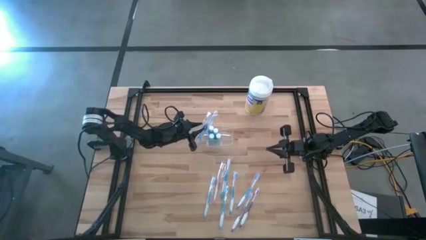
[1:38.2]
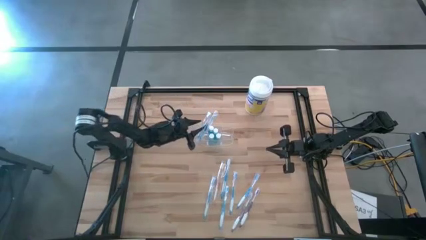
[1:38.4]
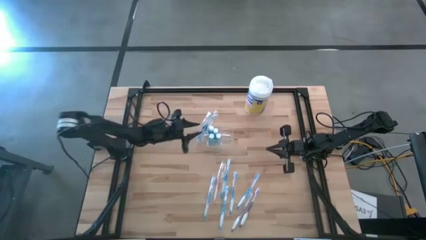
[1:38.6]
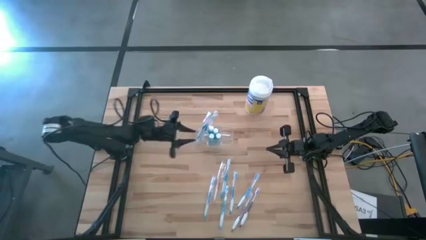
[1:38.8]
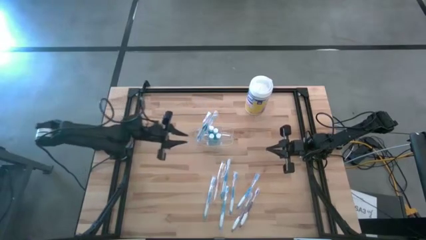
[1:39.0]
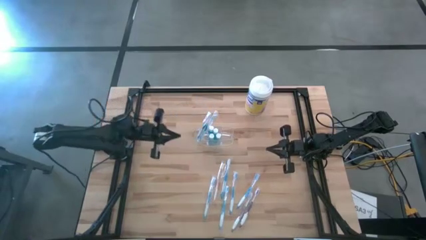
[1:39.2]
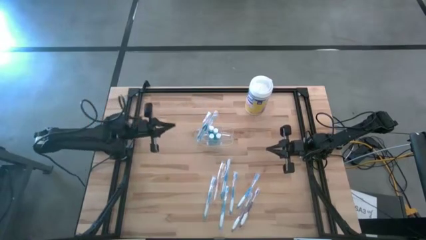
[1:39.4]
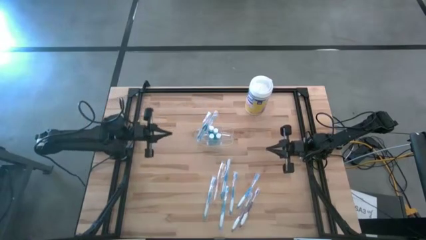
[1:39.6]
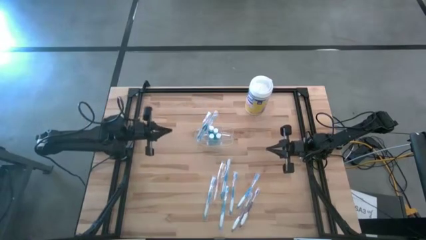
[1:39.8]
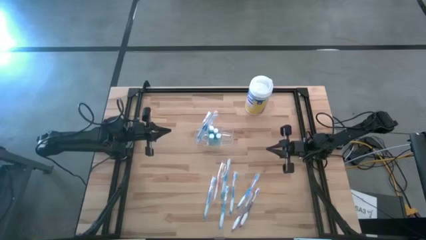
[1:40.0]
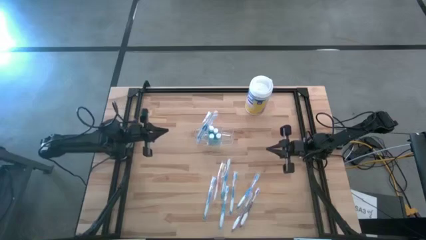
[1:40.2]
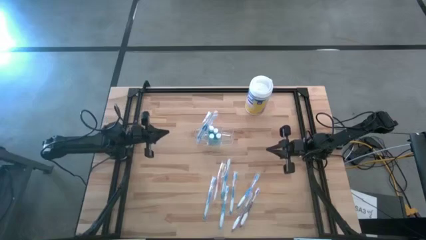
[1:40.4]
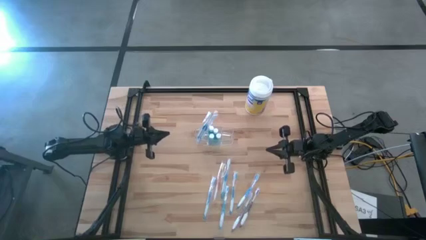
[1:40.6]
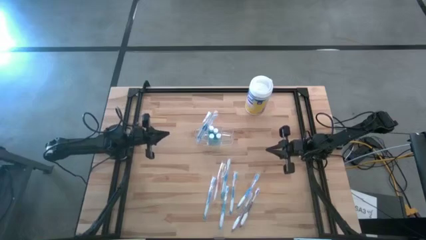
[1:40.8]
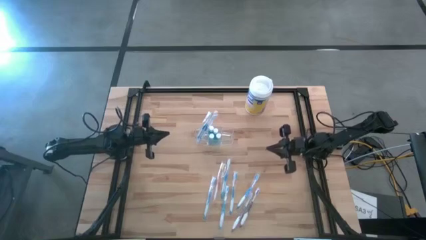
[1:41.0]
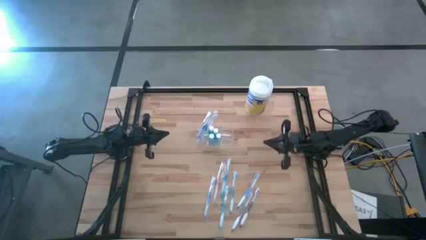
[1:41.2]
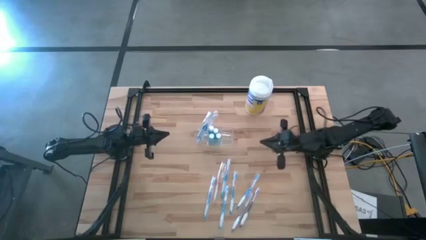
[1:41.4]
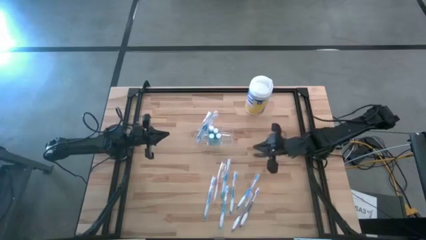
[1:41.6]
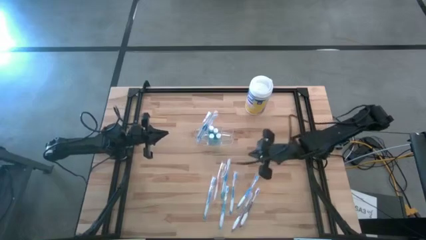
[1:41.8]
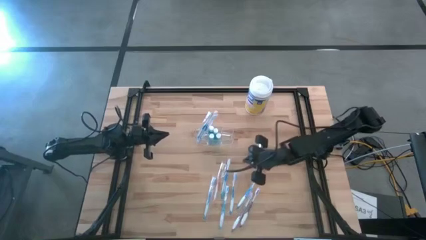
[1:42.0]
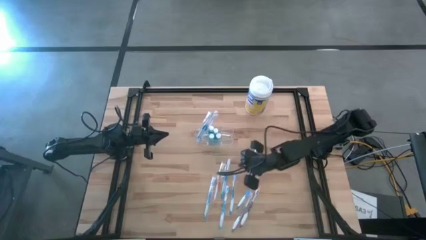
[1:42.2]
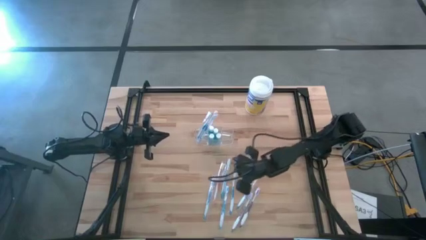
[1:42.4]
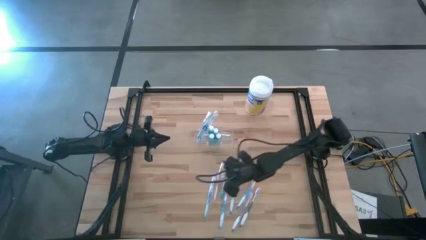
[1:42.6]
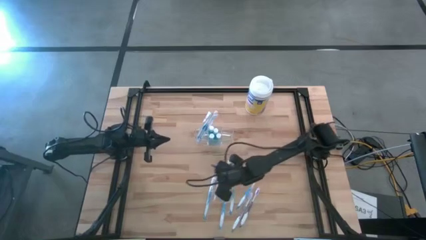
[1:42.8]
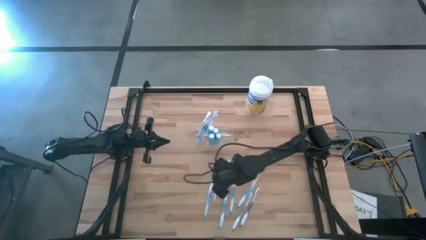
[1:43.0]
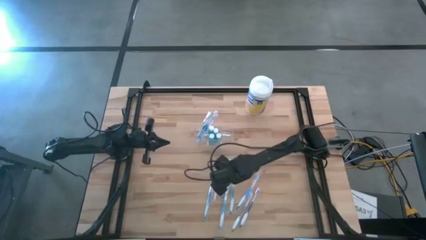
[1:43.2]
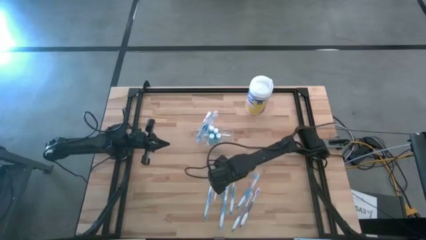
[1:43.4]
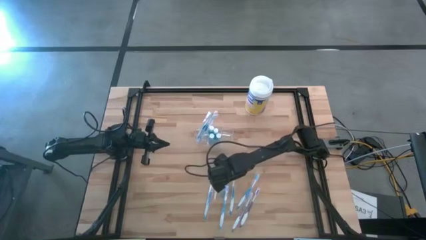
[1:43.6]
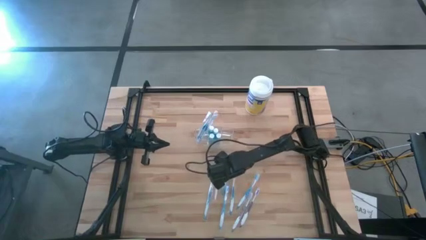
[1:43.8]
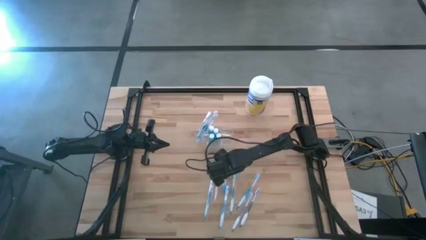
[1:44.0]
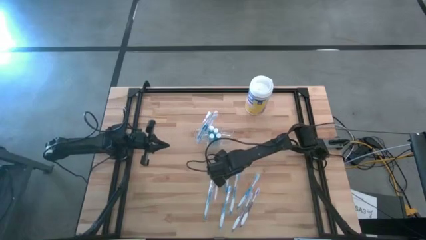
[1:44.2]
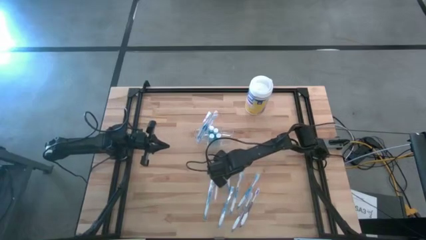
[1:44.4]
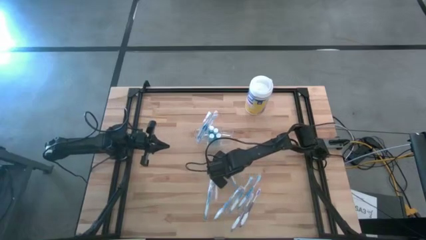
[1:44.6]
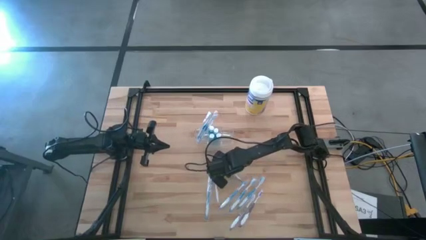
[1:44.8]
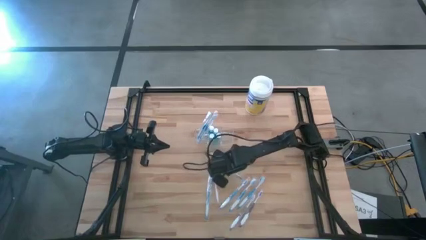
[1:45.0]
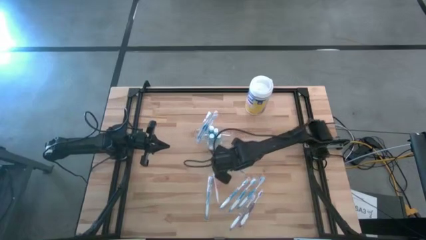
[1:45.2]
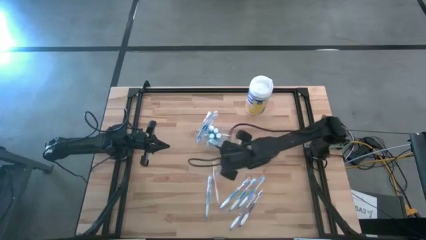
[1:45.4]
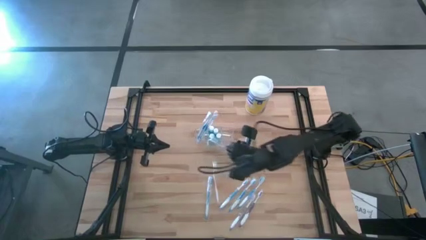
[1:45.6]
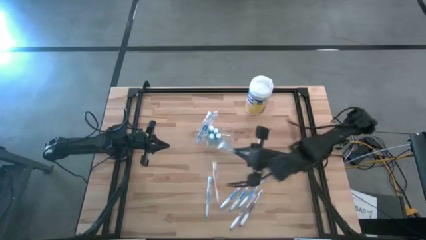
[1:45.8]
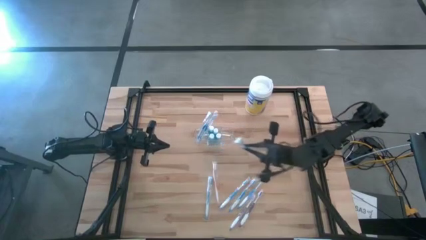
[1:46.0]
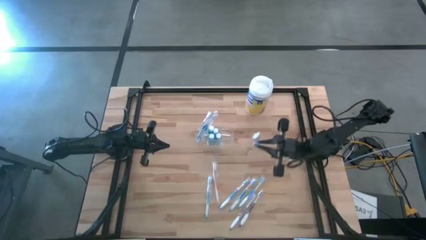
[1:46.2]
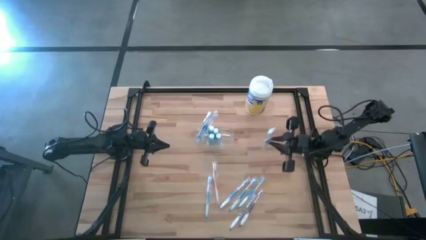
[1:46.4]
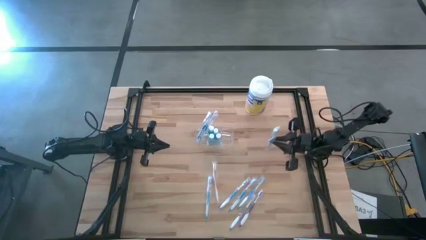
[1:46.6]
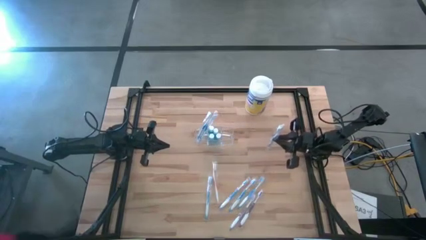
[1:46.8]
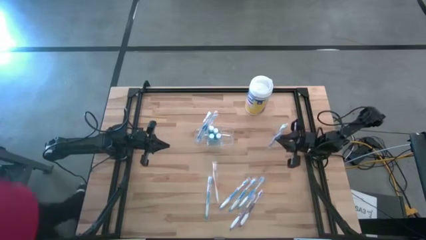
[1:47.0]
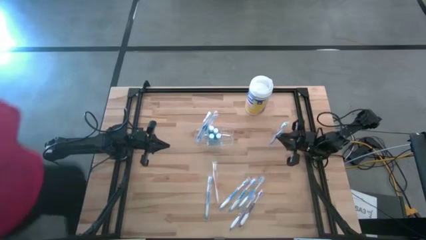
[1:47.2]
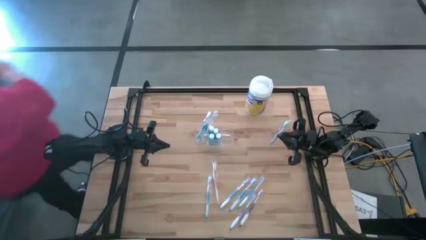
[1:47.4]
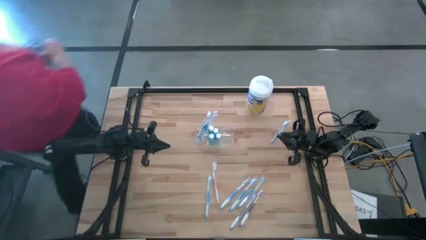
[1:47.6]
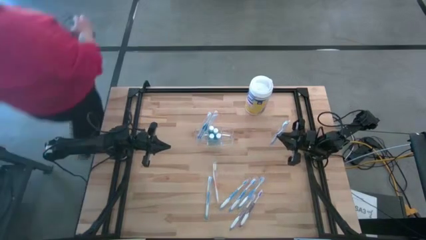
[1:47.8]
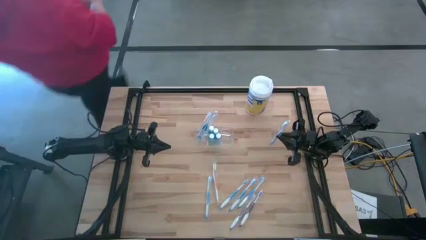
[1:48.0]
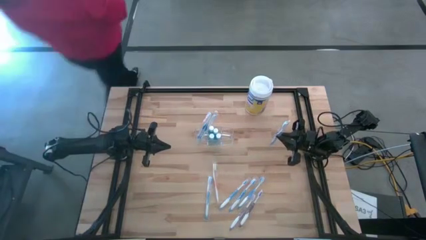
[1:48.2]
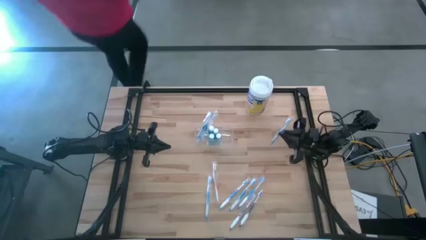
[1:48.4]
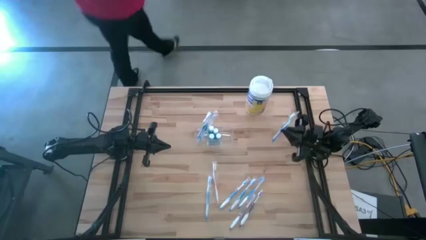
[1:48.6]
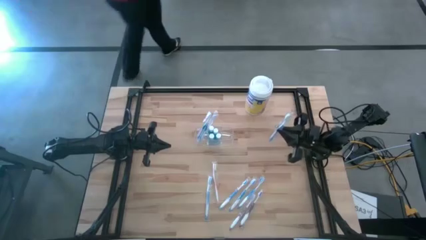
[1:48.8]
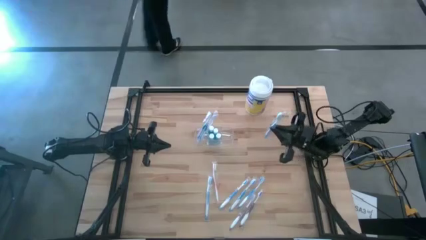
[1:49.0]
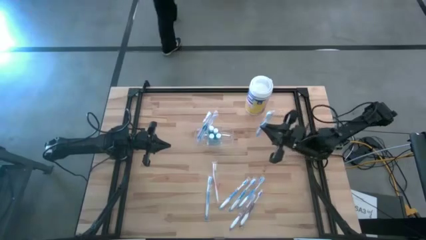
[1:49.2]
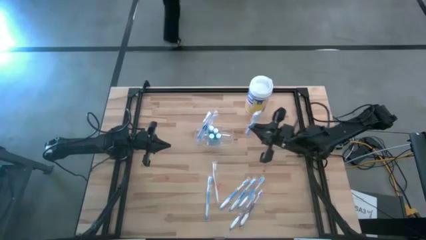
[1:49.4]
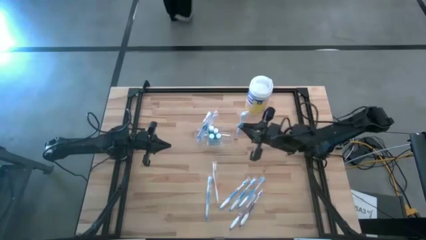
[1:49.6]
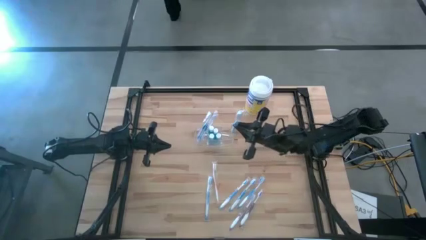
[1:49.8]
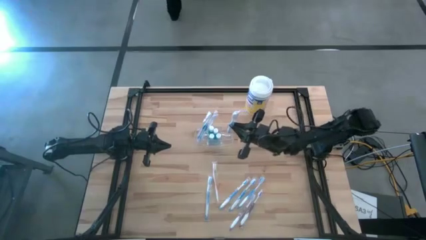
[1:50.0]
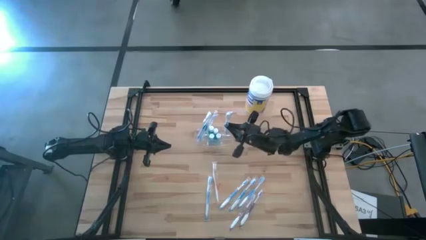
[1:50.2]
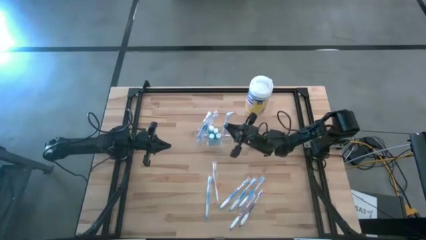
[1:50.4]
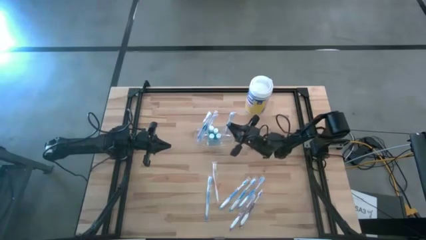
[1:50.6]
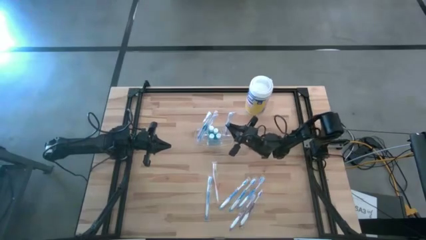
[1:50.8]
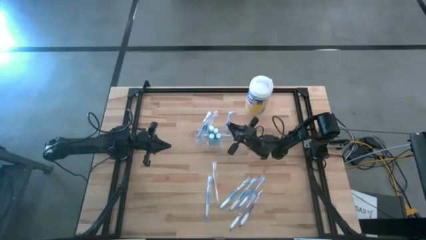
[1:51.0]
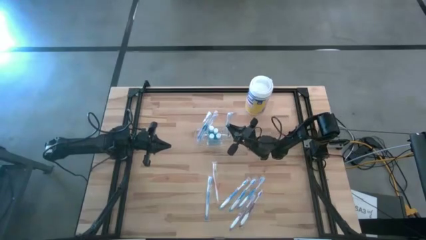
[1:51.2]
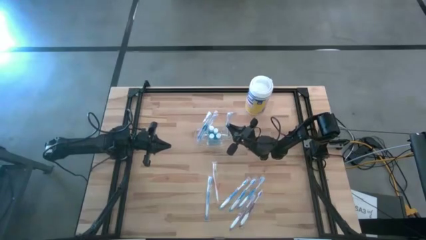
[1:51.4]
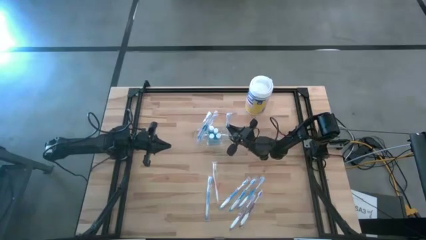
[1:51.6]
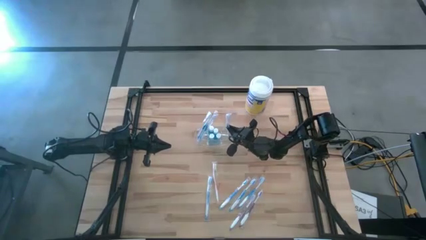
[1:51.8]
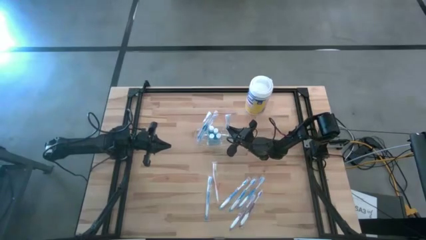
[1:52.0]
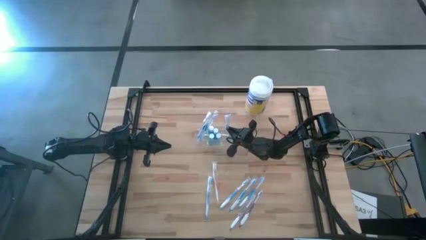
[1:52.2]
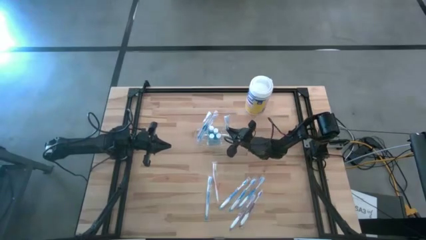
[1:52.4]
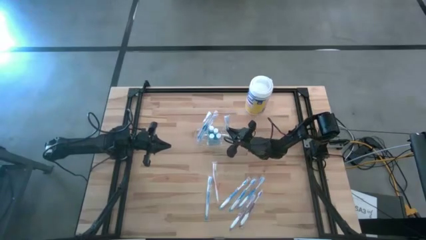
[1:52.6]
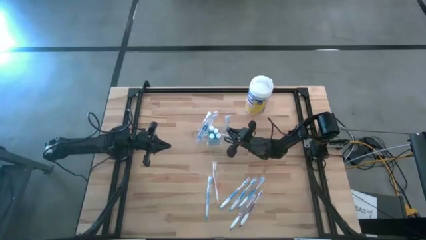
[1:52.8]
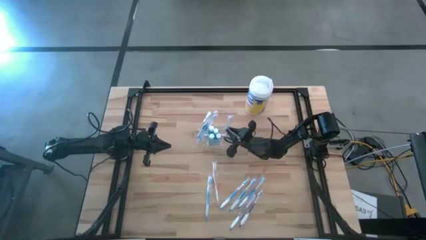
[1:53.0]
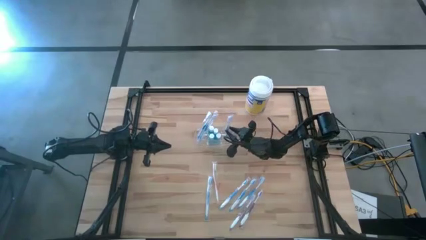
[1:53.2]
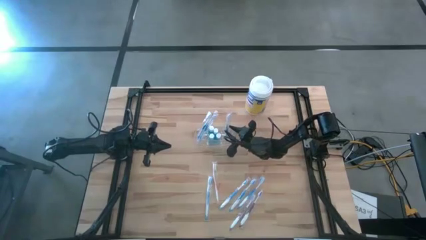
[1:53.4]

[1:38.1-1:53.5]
Task: Pick & Place toothbrushing station
Put the blue toothbrush into the transparent organizer
